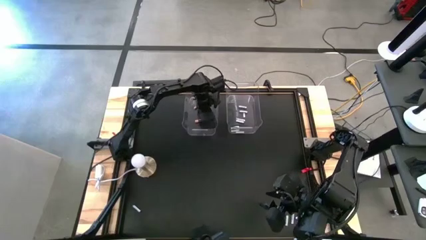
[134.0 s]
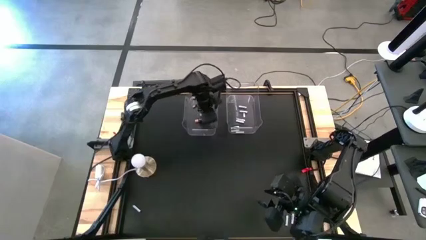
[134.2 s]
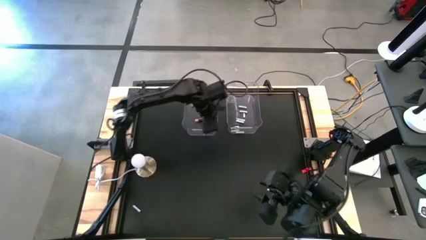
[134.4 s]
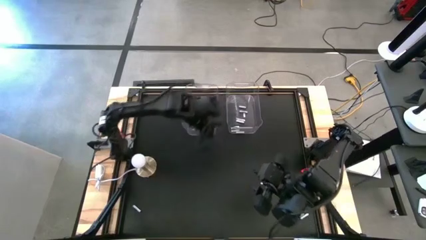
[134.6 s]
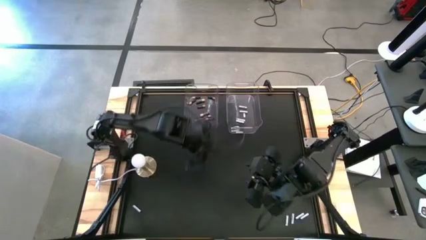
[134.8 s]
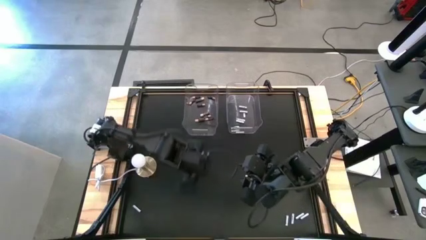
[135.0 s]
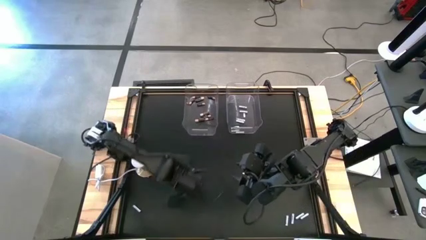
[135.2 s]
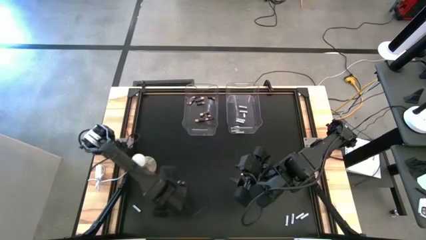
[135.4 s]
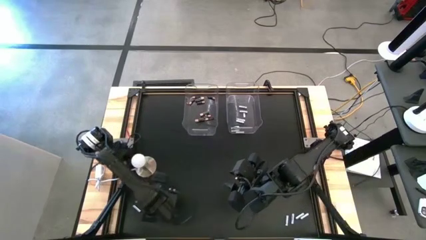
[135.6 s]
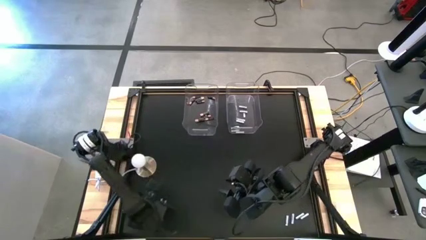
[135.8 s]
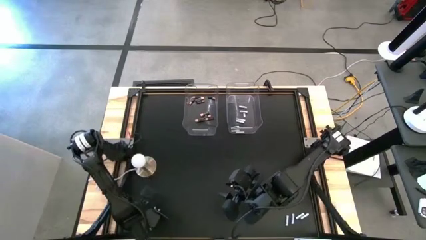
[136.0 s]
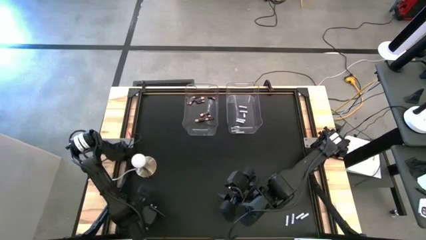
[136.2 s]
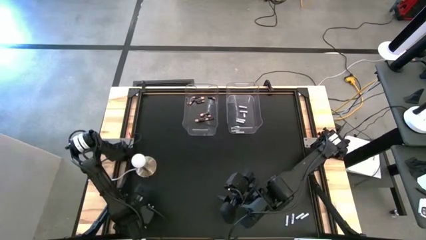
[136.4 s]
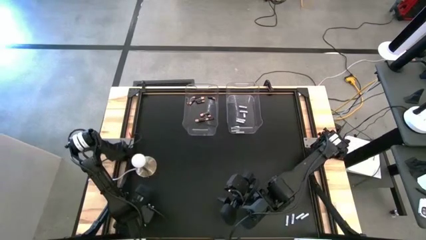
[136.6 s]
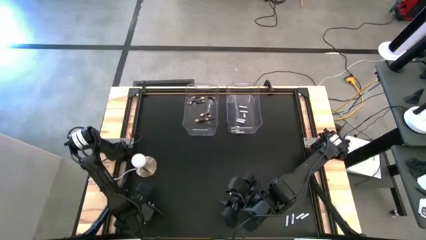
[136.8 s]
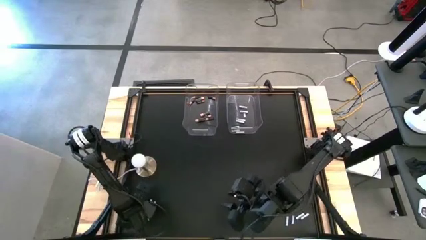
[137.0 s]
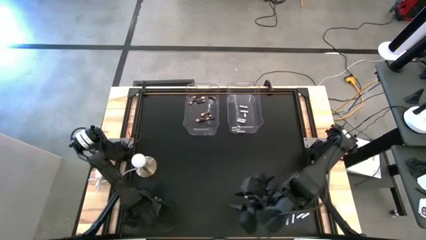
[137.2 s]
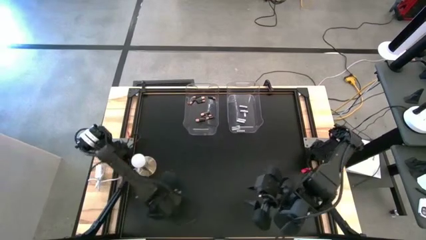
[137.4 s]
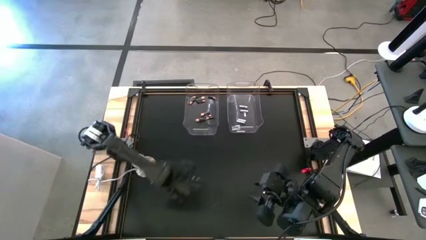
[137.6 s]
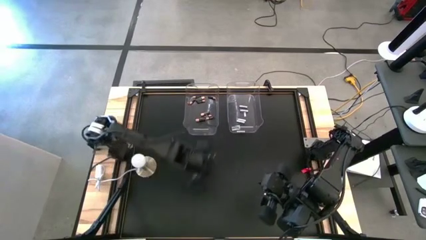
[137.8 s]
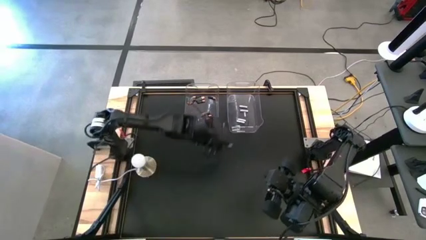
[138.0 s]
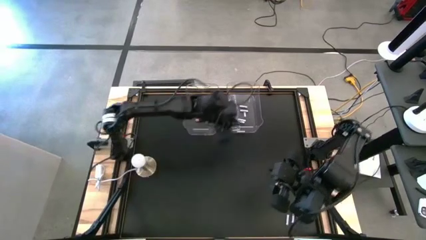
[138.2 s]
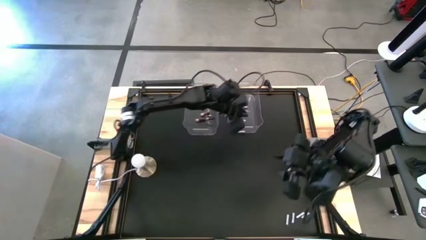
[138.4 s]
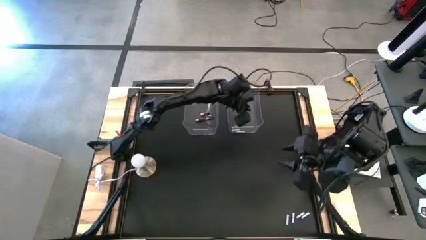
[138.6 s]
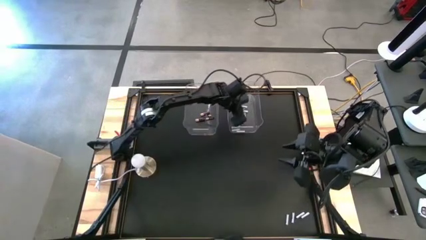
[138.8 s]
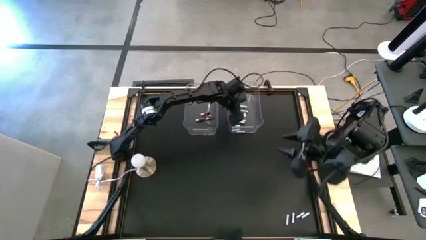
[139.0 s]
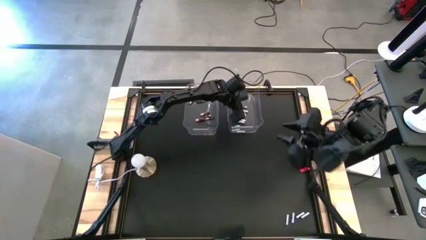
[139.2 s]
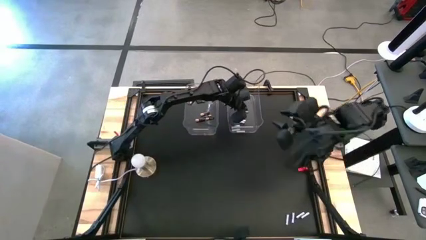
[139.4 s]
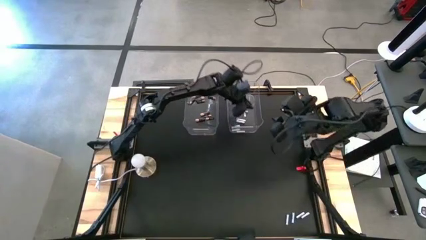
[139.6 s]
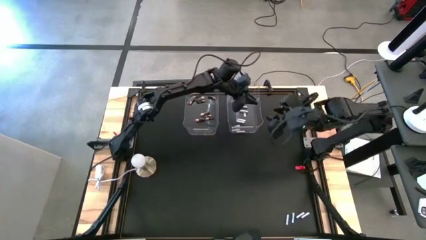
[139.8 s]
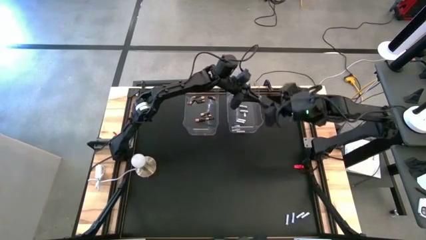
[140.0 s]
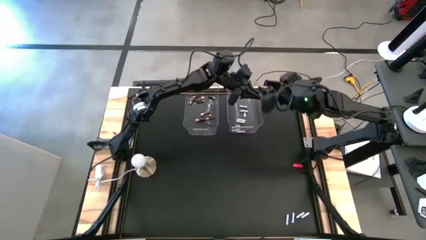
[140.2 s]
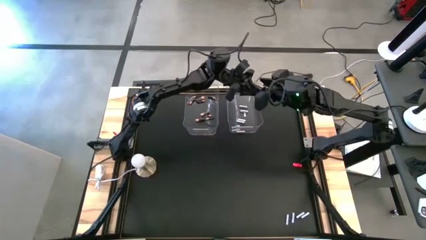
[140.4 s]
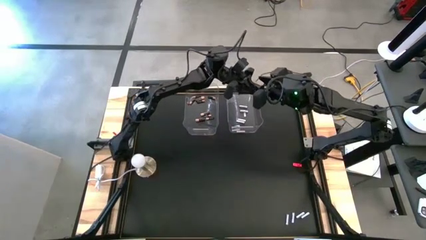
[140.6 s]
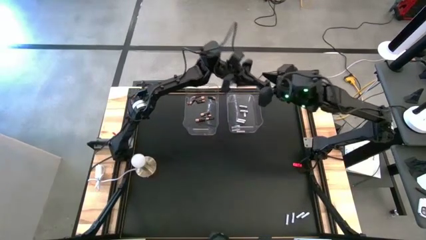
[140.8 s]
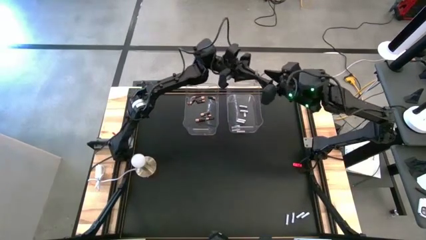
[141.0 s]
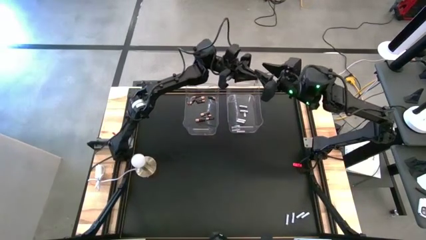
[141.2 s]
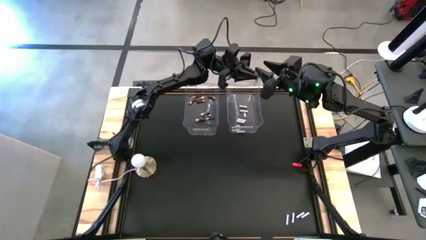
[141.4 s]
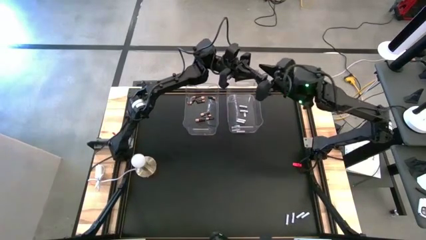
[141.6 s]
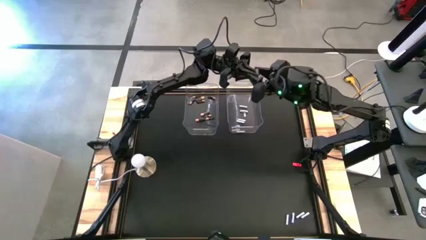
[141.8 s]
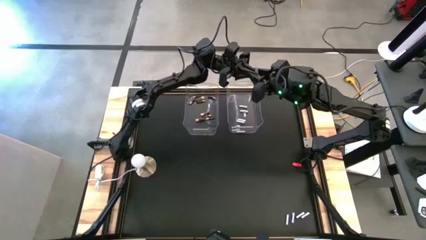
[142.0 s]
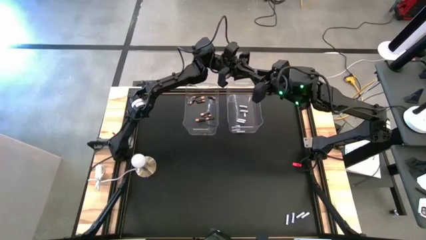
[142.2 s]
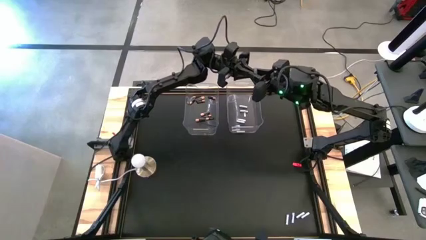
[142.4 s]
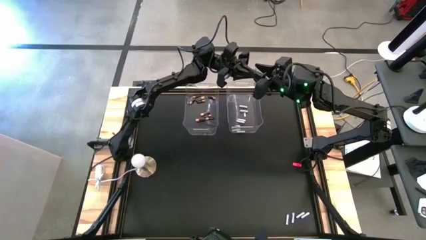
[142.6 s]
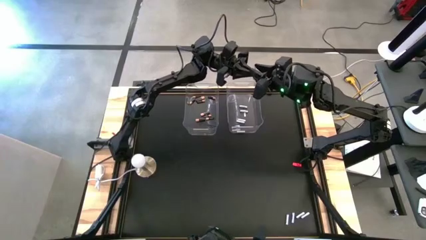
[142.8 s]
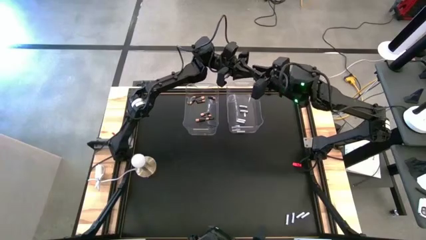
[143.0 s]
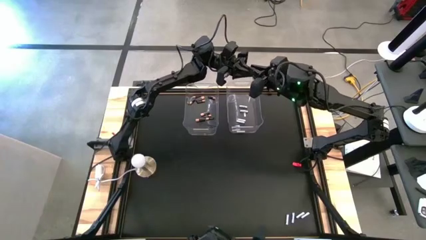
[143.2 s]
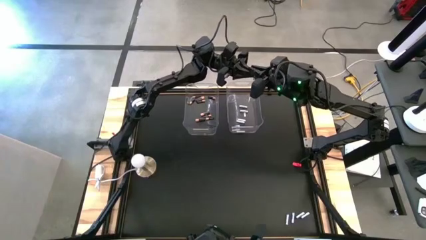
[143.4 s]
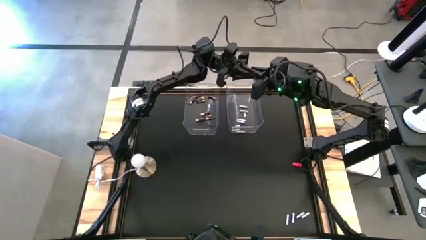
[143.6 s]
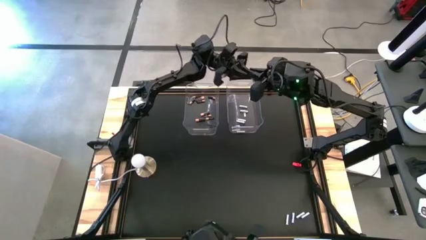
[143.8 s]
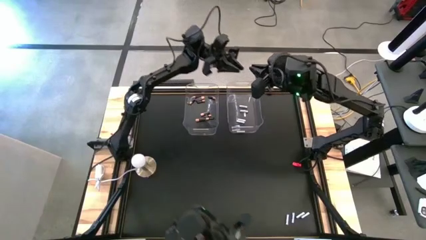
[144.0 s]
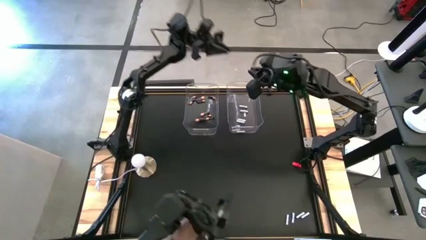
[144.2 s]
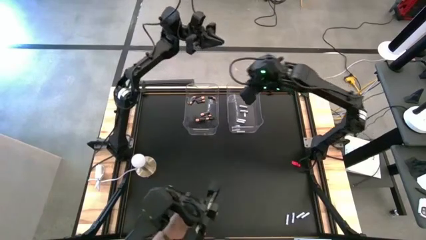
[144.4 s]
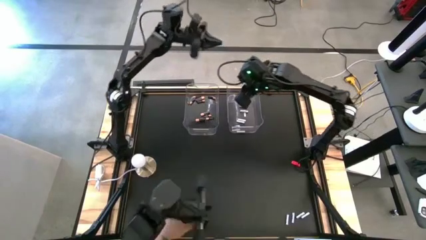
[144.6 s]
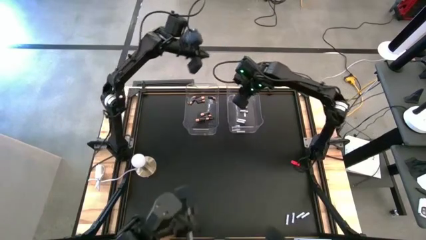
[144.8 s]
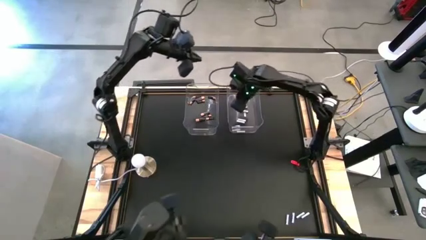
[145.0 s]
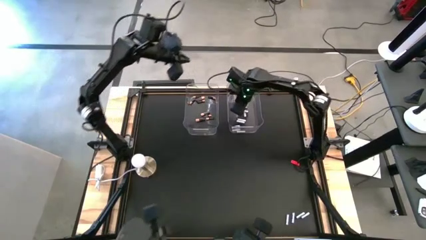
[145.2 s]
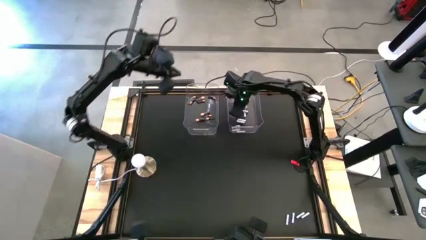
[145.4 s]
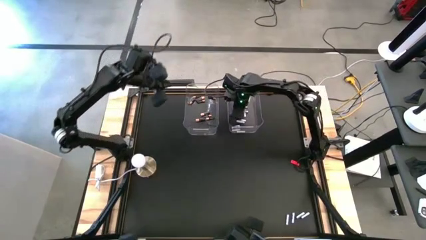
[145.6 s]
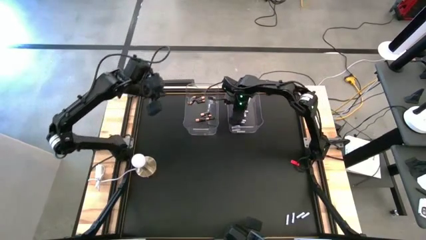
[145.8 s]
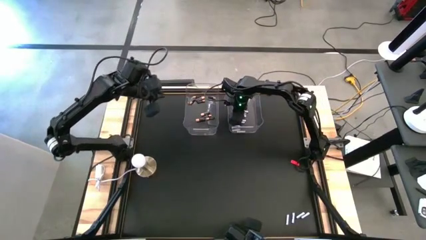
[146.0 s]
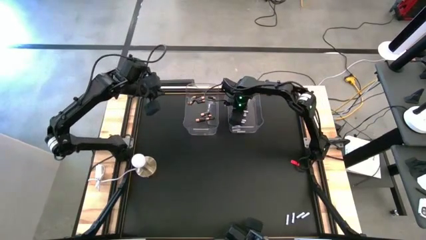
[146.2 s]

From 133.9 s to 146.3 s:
Task: Sort batteries
Put the white battery into the right transparent bin

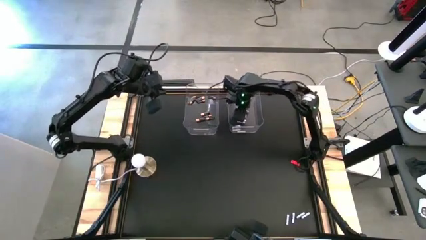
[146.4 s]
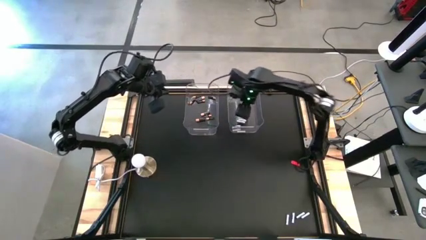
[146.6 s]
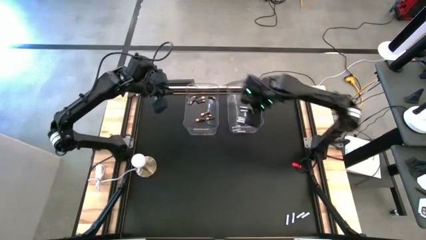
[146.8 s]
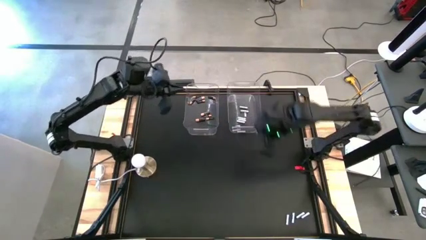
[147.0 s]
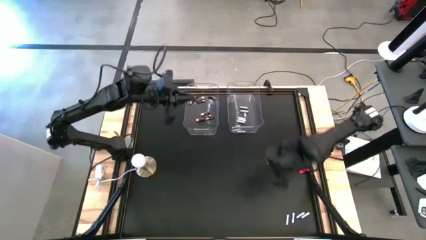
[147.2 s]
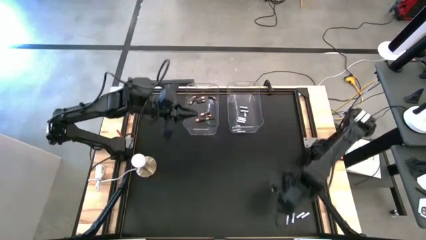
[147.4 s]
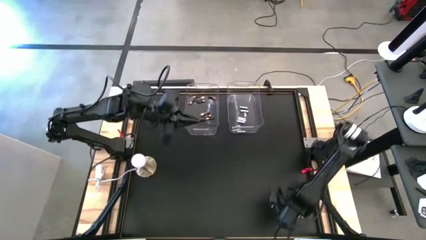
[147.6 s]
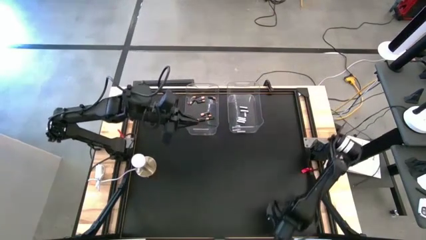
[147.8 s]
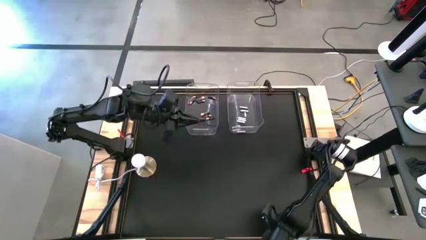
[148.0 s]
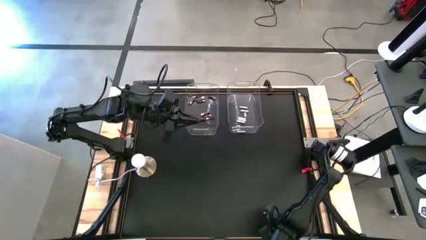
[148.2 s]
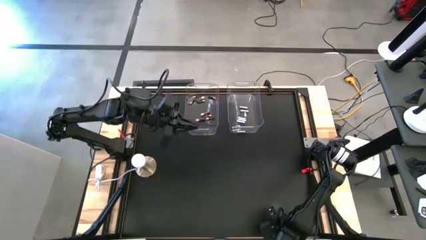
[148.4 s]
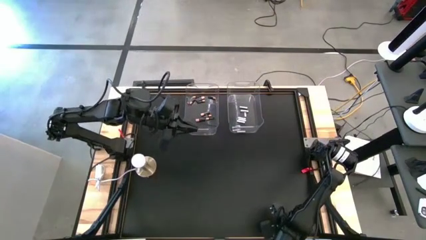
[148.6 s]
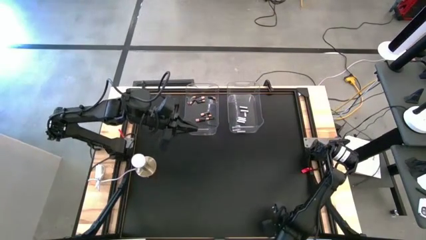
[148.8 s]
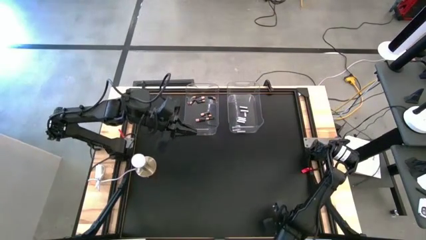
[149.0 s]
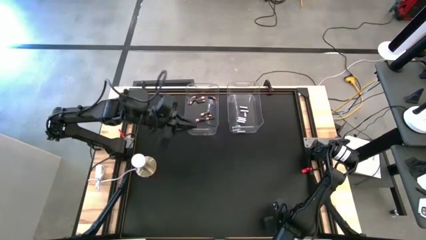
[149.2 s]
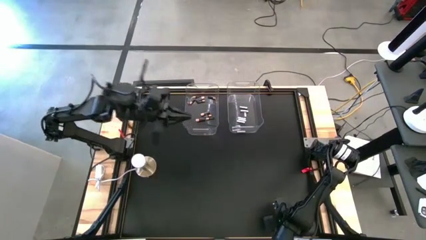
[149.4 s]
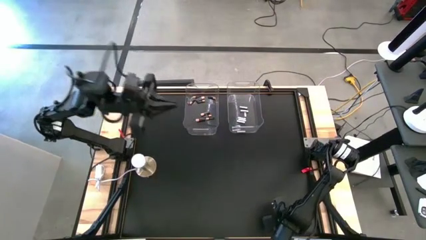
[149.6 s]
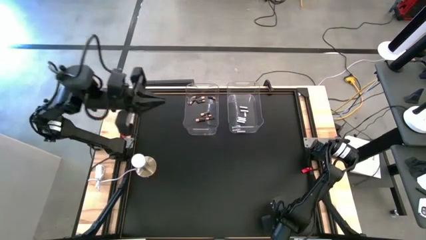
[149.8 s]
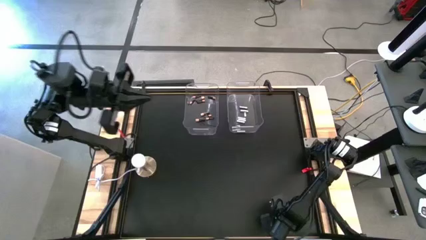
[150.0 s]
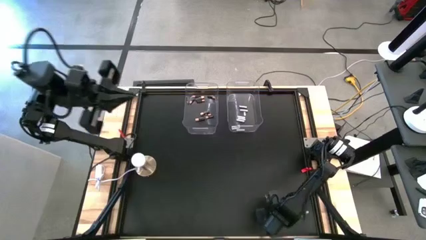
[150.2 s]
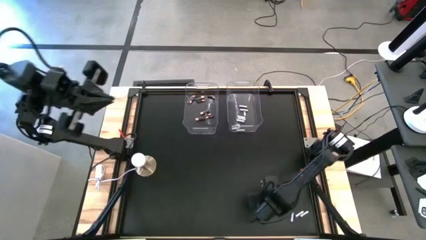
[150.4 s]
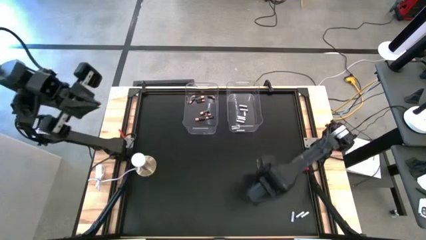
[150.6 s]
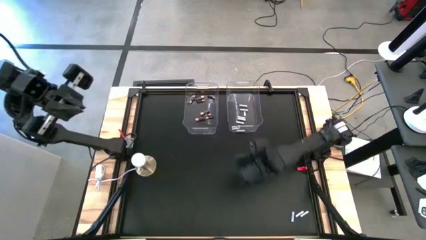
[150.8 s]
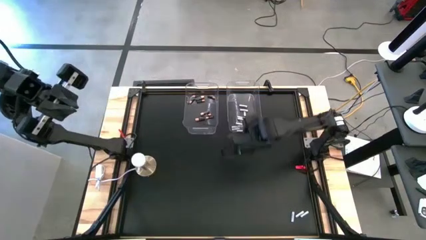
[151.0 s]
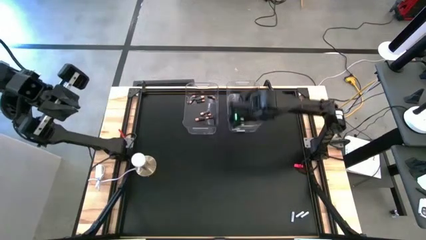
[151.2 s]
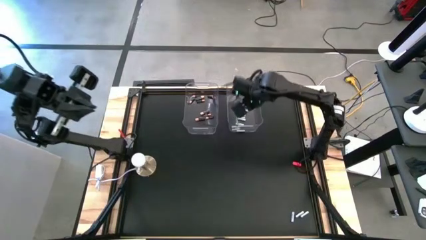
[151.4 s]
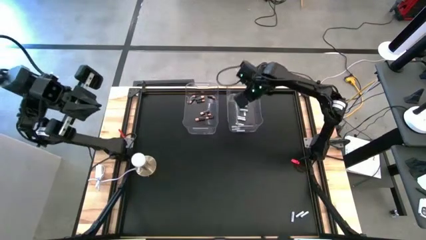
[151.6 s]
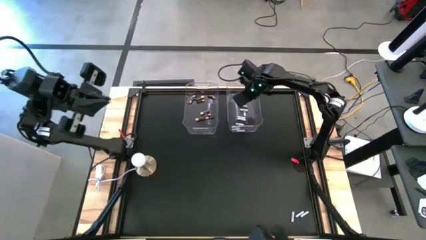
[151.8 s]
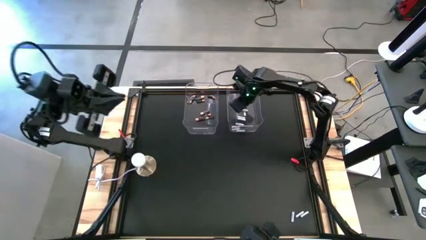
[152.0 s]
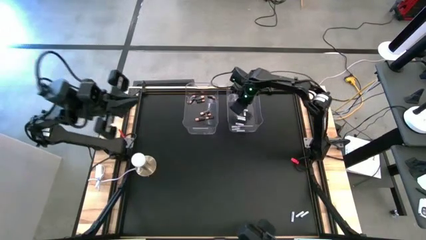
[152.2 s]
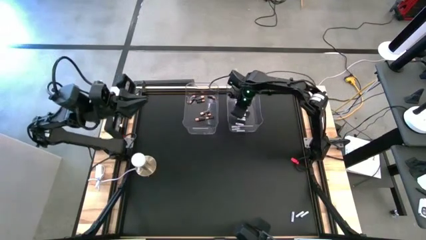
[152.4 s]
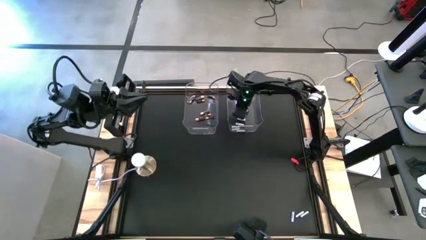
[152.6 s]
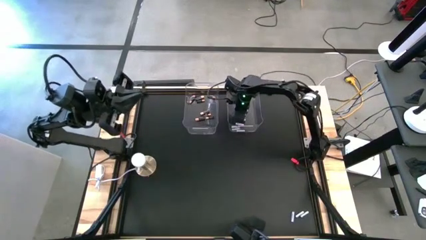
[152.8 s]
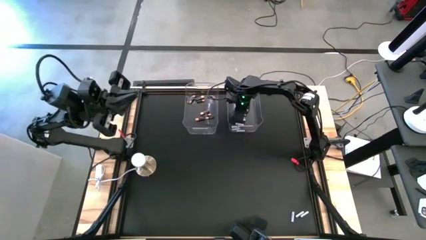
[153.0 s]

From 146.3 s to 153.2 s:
Put the white battery into the right transparent bin
